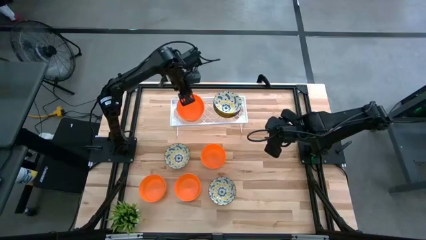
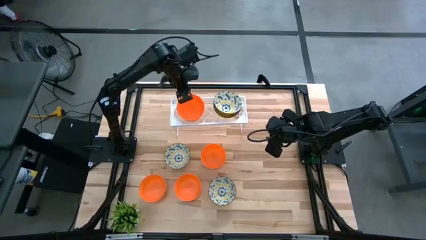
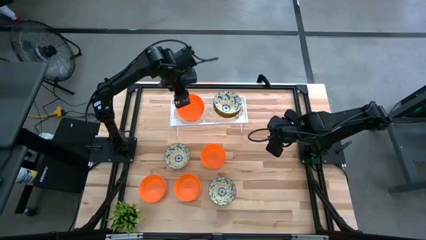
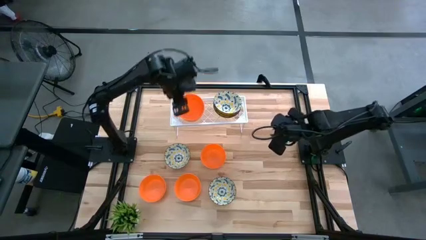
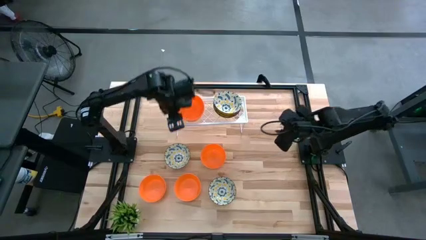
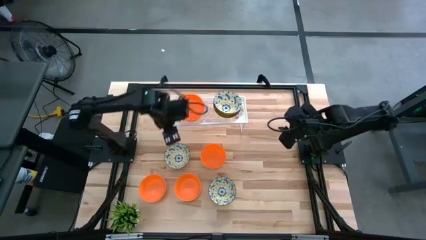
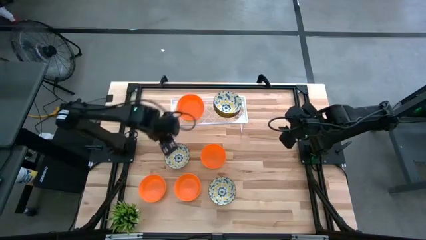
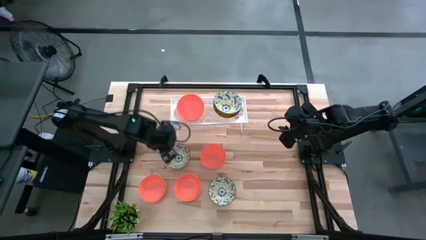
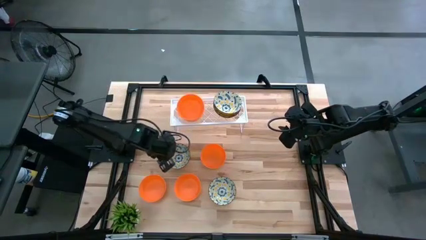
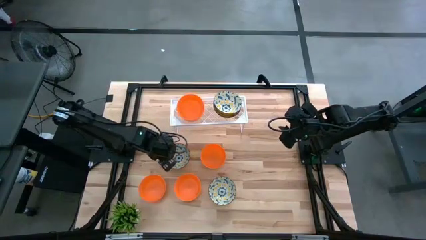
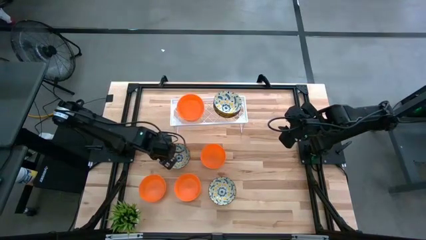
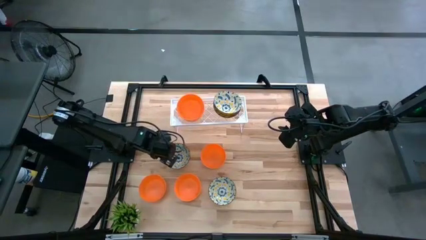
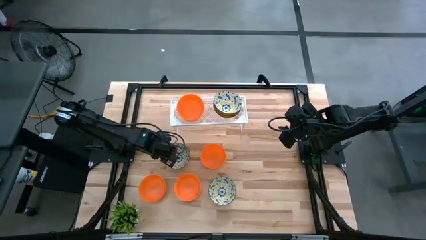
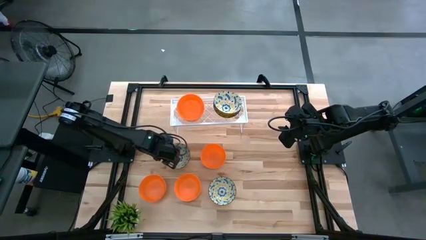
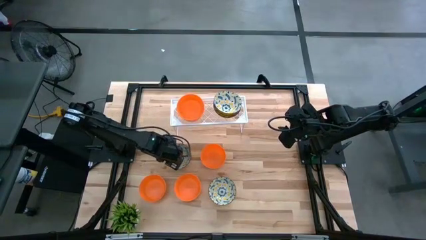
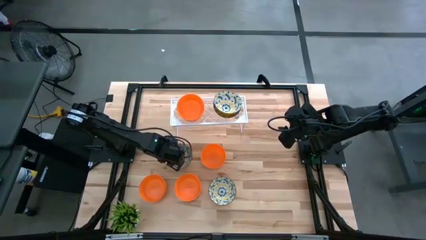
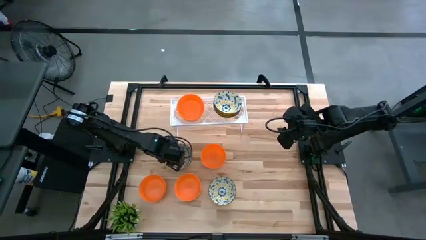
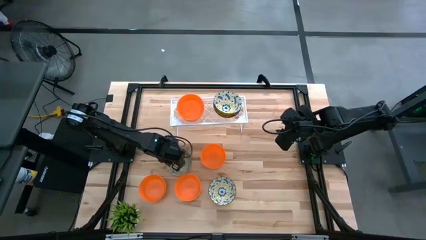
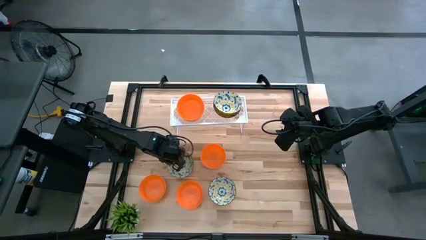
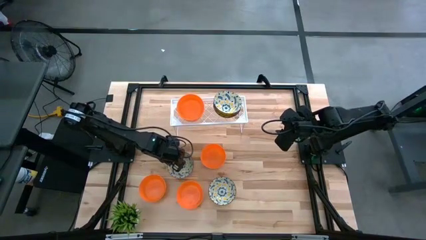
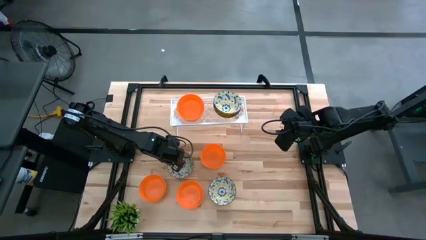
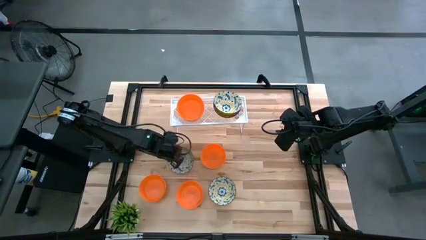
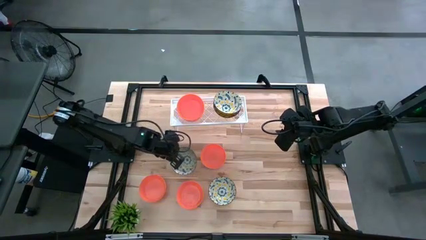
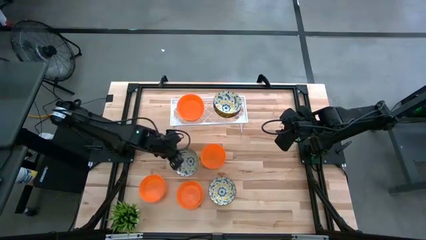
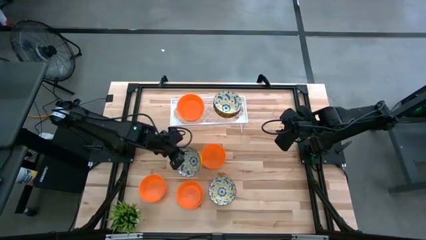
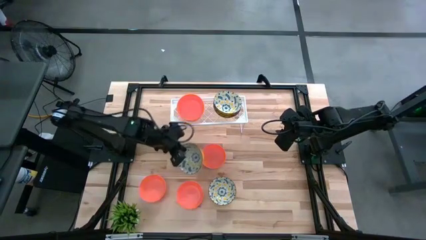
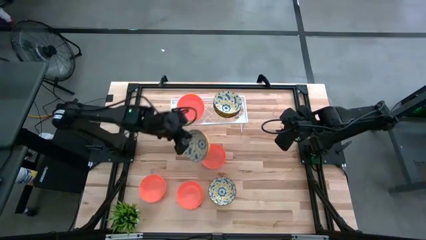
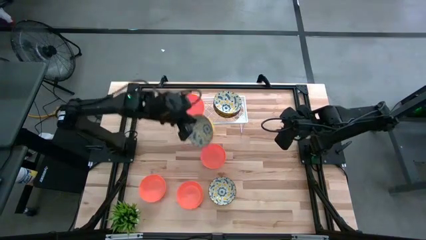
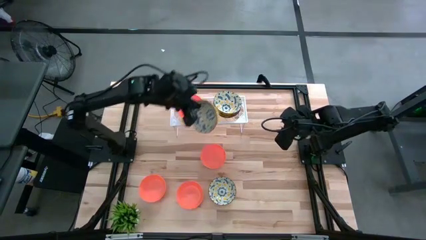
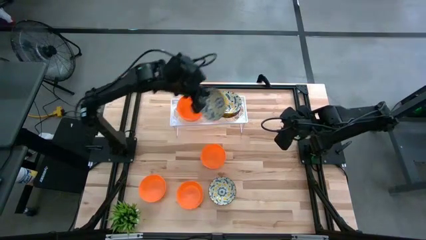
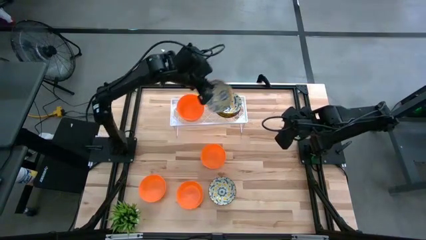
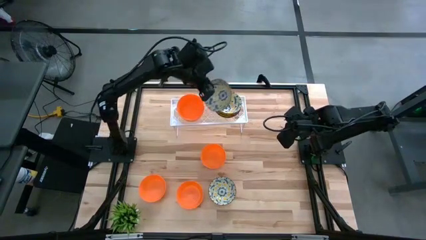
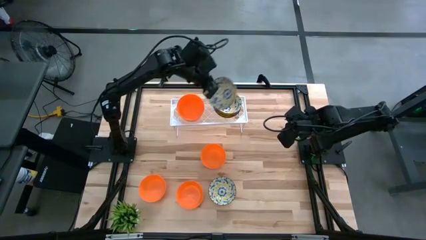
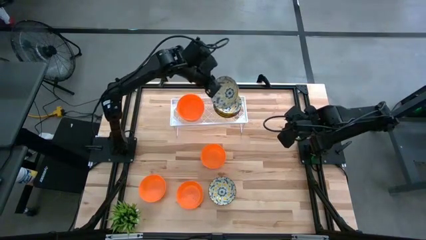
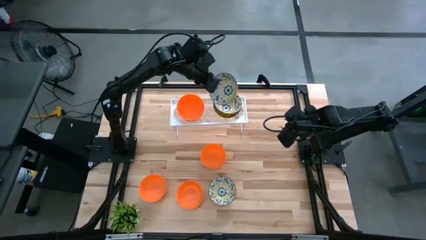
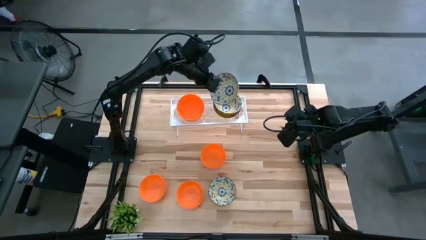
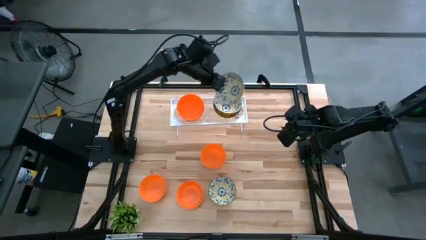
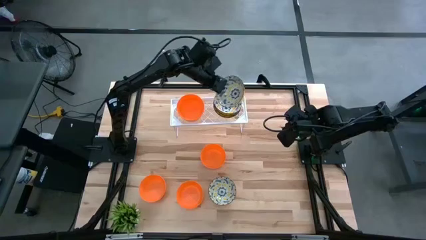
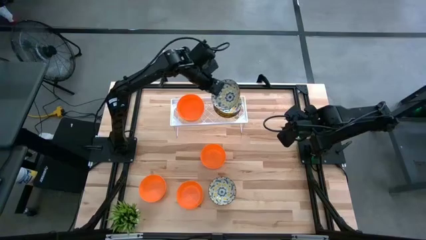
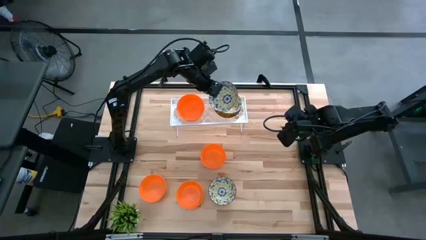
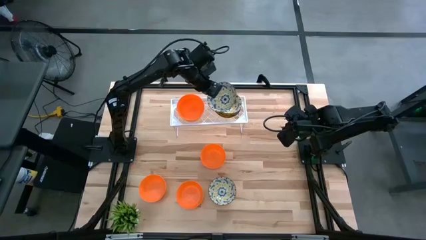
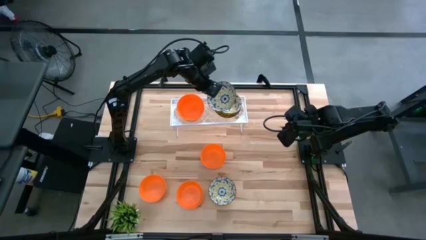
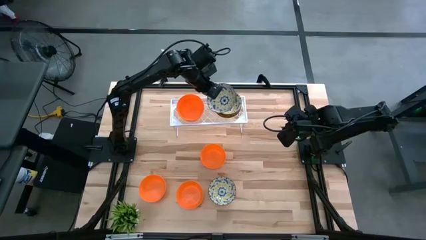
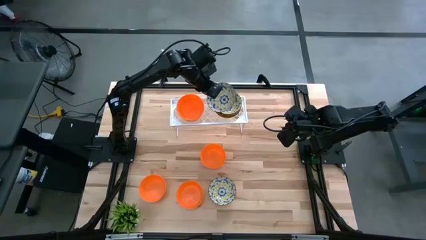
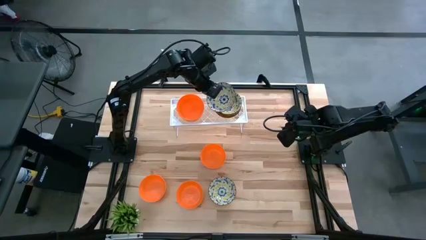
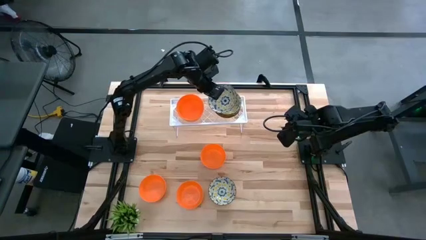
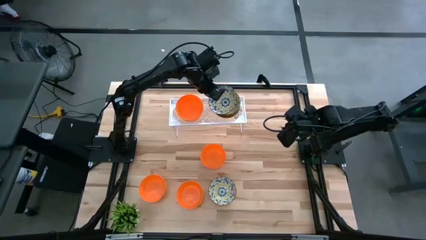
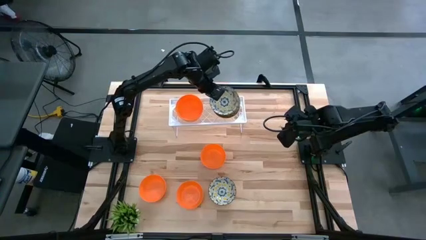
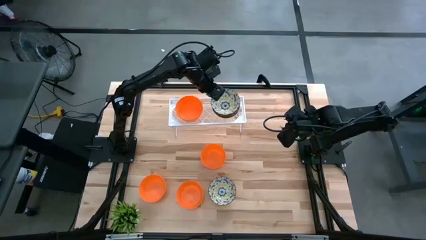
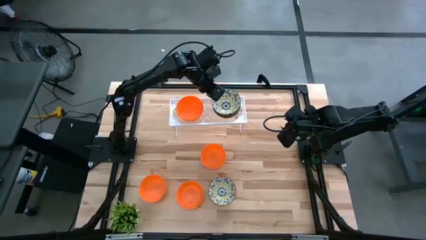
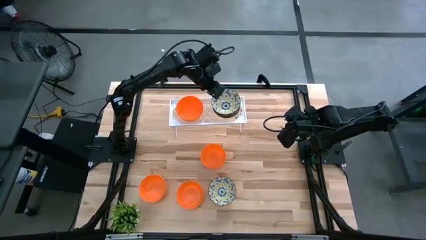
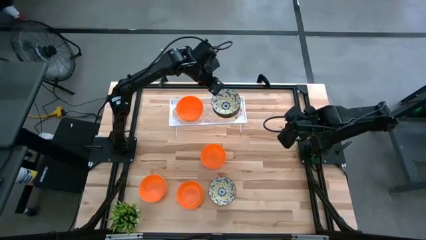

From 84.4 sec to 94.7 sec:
Task: Pick & Place Mini bowls
Stack the white patterned bowl on the other white patterned bowls on the shelf
